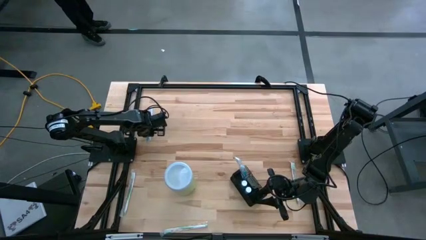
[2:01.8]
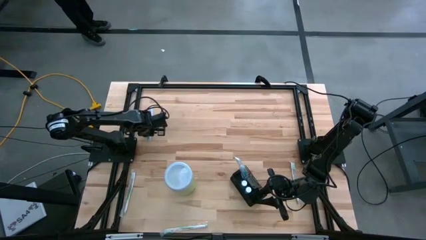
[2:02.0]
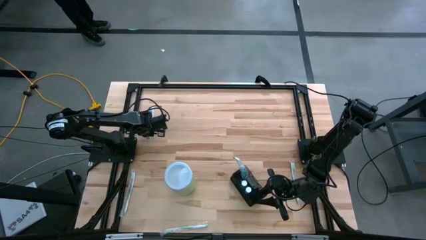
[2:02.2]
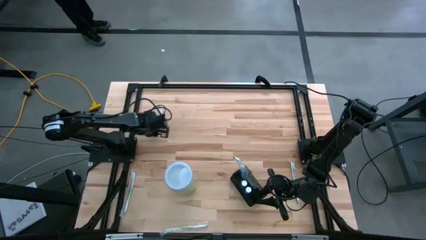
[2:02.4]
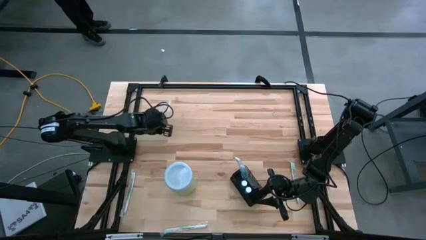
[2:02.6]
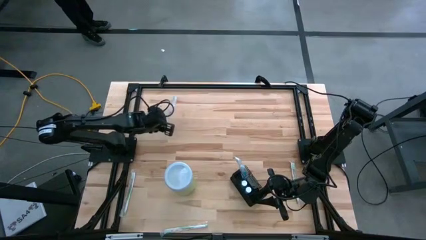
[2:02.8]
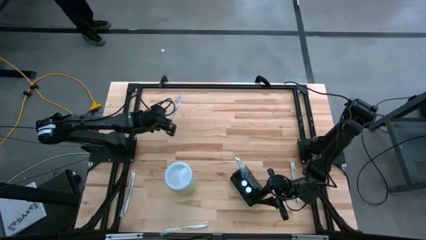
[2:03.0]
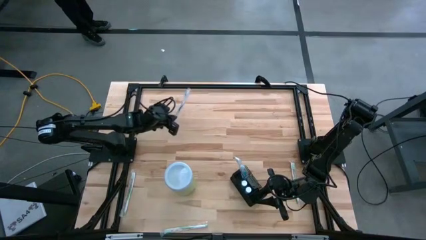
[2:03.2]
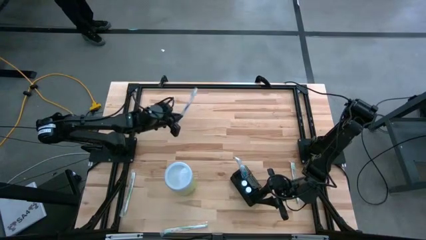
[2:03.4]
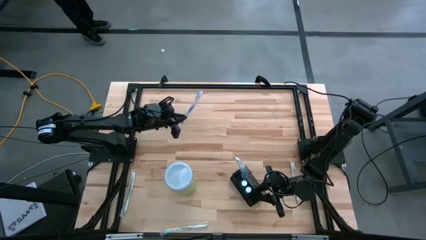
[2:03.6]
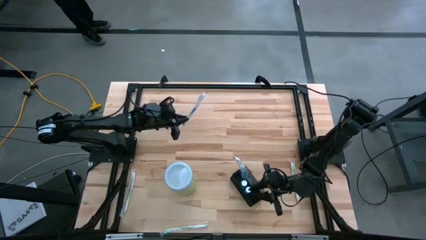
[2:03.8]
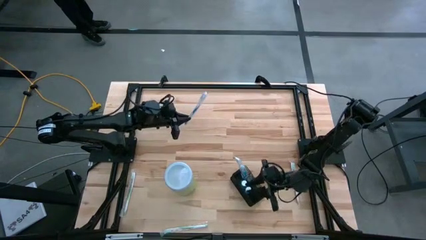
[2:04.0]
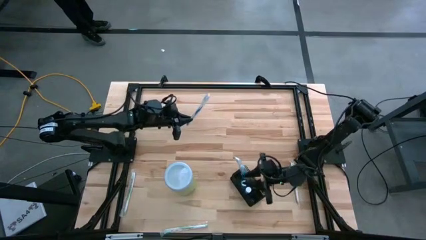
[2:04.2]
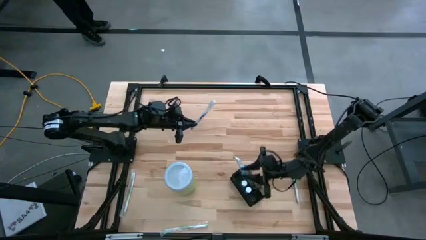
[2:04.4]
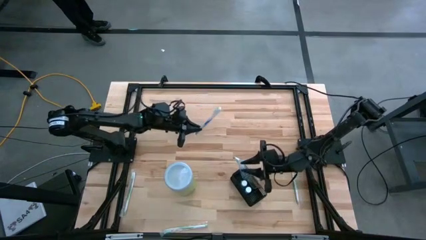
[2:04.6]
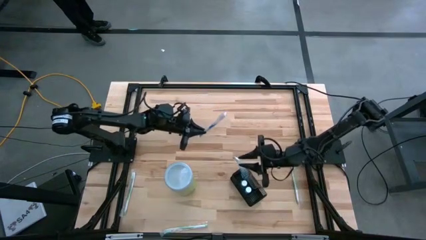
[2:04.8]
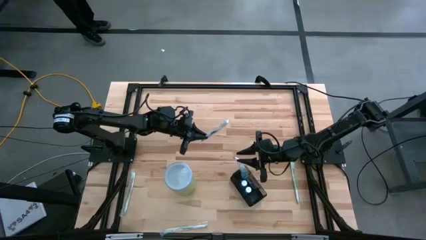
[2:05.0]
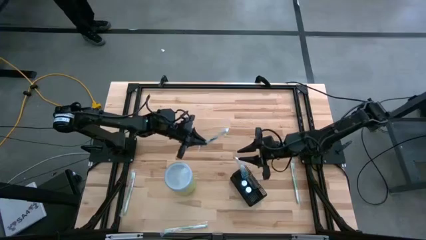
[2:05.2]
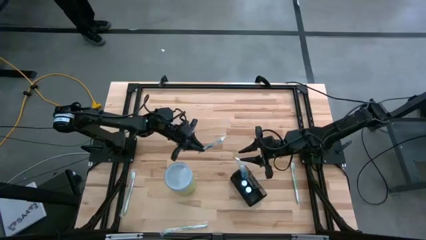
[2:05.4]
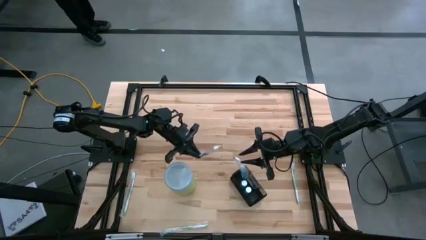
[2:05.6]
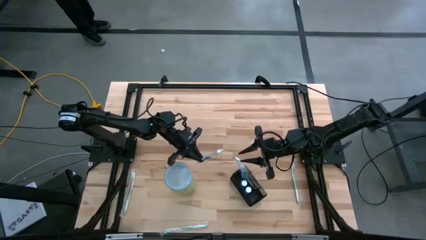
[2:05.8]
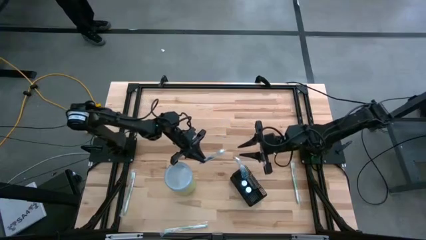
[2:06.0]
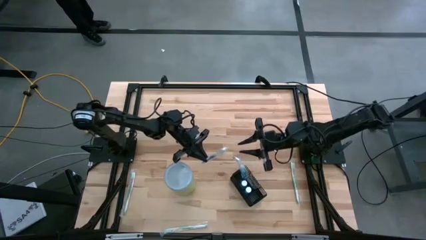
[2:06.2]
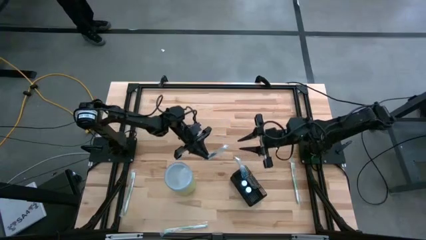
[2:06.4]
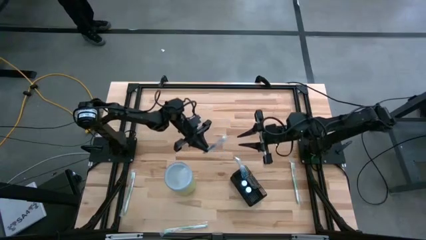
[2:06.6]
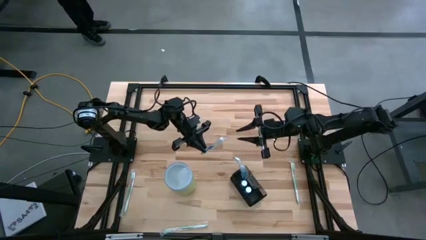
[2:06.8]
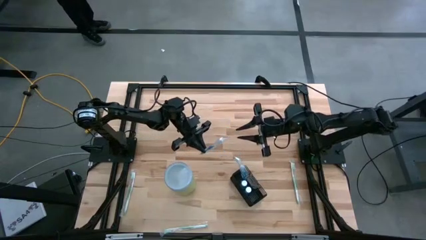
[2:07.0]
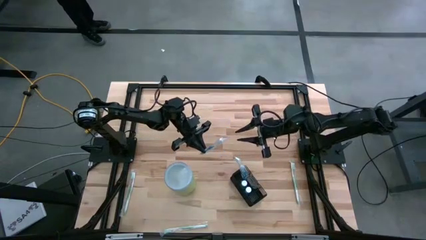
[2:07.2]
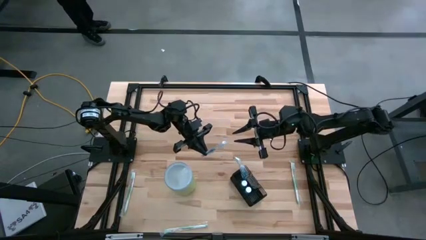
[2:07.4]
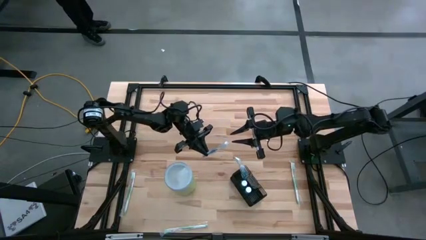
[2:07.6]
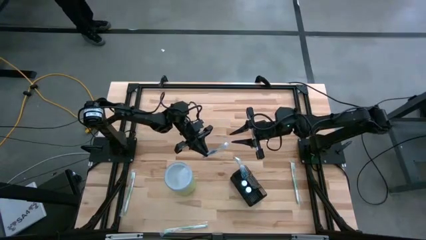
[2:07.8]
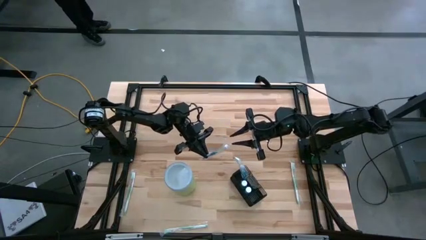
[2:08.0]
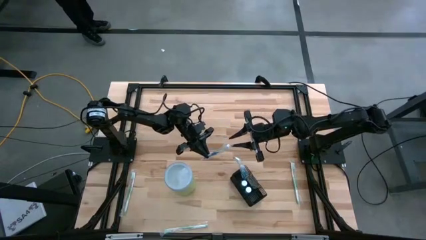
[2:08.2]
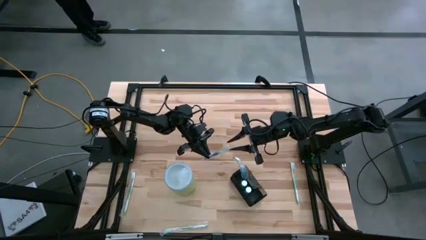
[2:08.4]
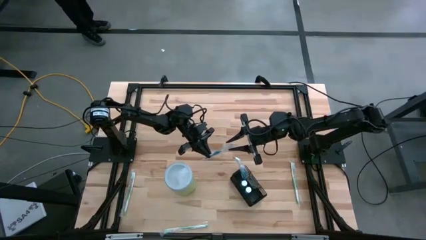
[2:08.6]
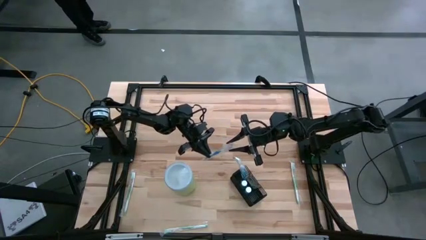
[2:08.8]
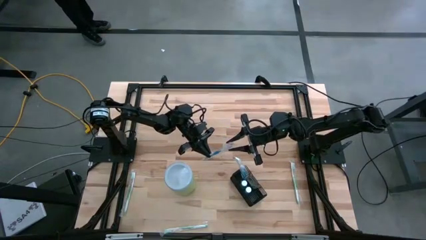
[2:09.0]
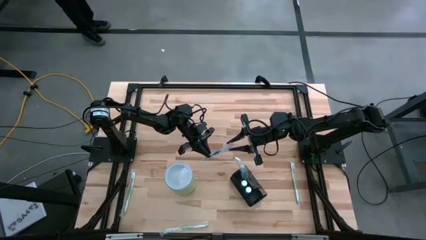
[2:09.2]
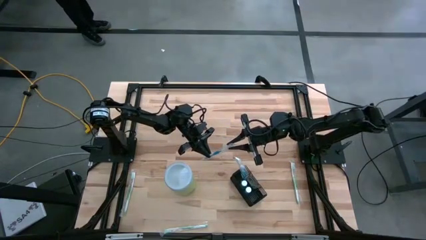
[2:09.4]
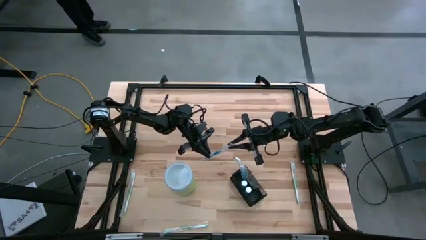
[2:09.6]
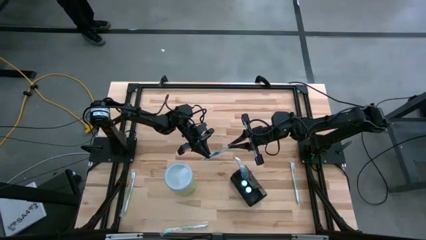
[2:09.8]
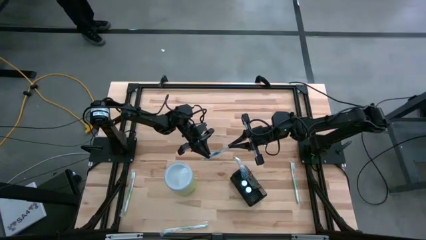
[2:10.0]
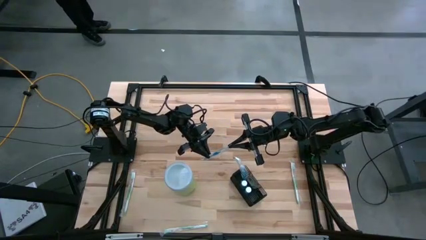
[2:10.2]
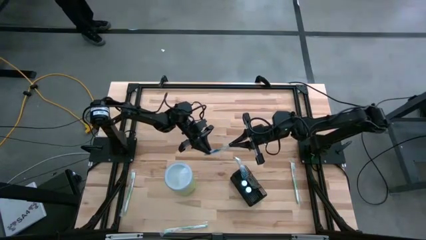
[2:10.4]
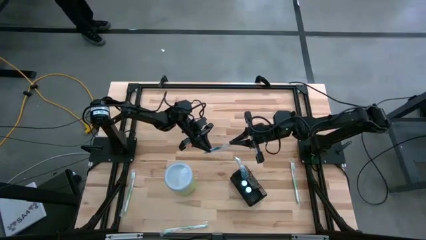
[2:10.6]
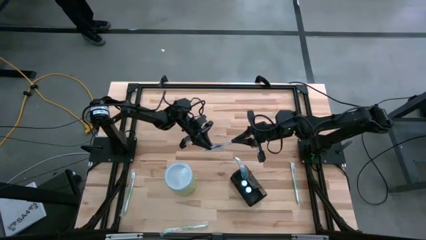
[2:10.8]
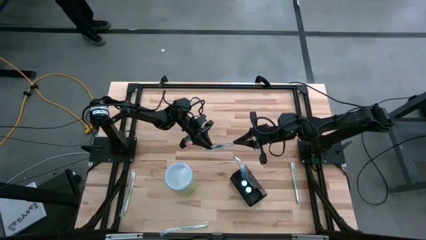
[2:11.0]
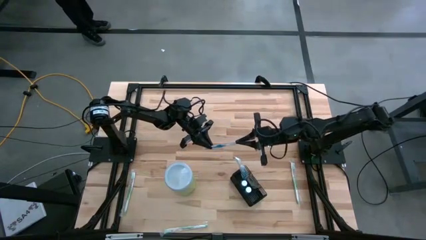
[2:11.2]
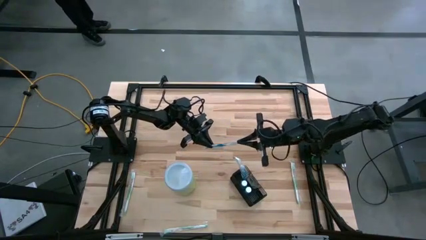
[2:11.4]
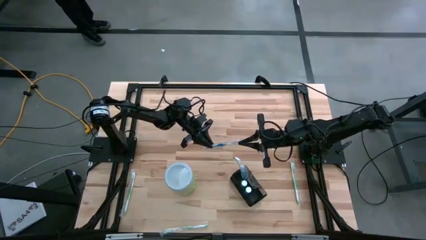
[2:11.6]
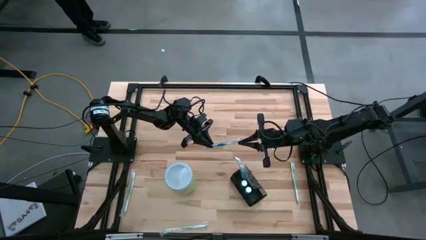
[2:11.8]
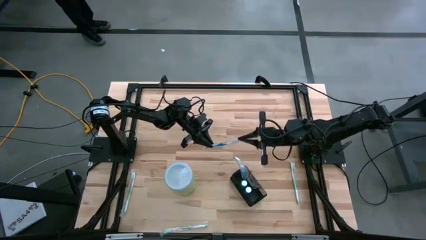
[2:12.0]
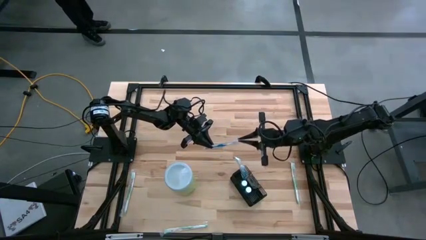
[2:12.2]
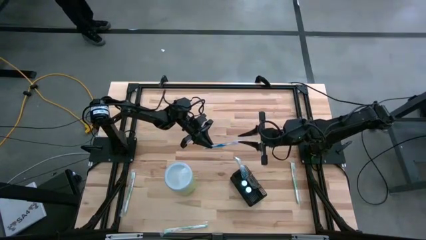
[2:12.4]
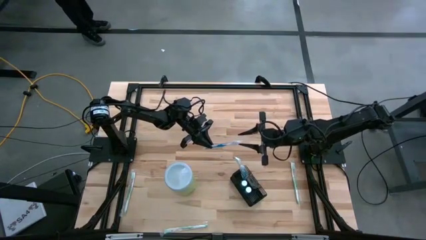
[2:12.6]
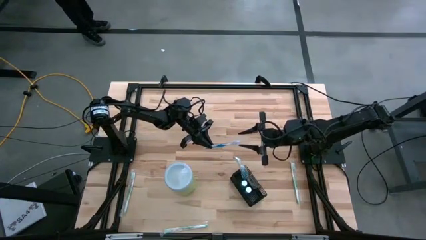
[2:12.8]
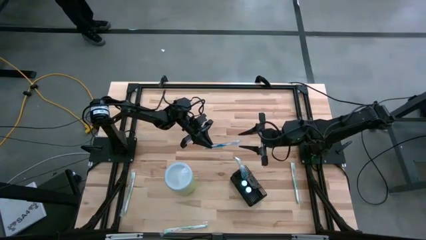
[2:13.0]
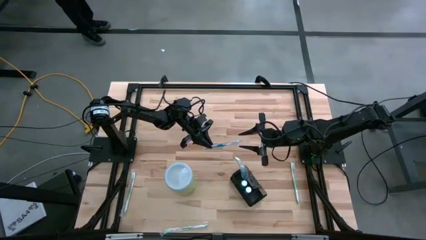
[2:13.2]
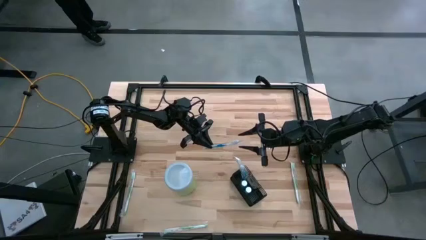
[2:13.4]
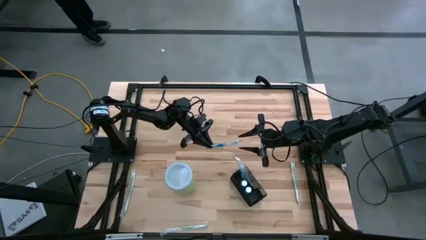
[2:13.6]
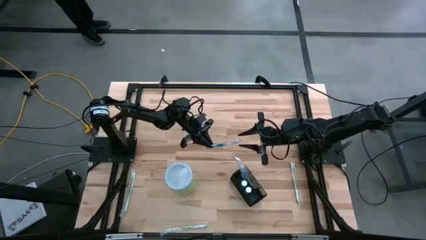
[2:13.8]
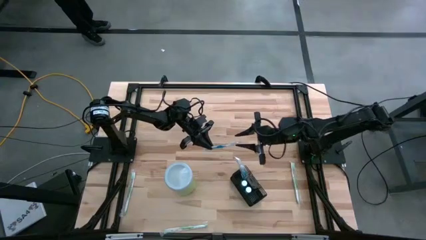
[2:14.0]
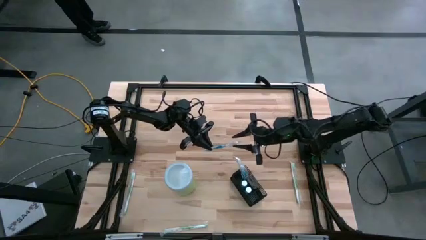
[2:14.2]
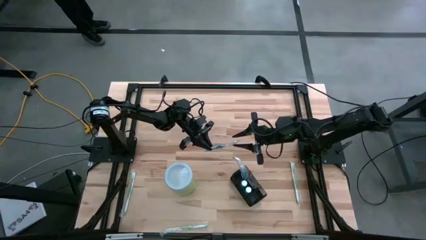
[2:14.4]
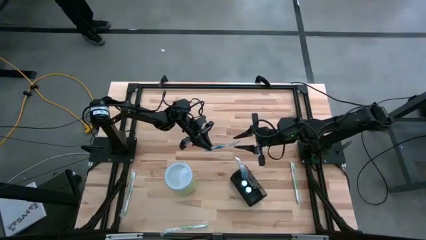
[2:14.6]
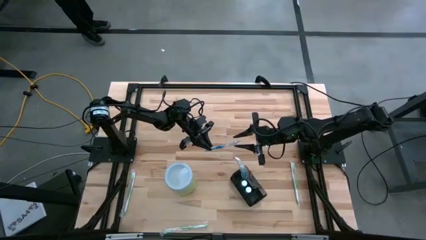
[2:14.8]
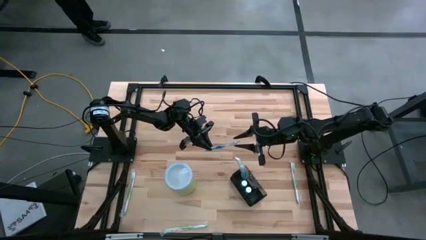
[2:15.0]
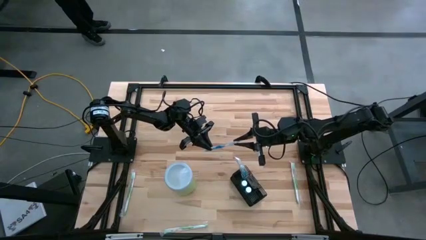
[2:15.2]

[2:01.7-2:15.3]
Task: Pick & Place toothbrushing station
Put the blue toothbrush into the black mesh organizer

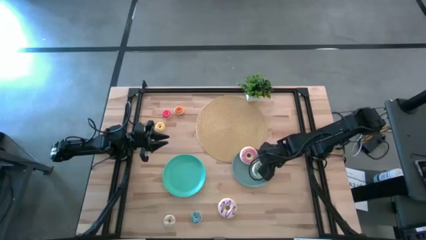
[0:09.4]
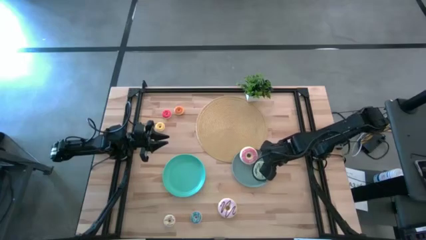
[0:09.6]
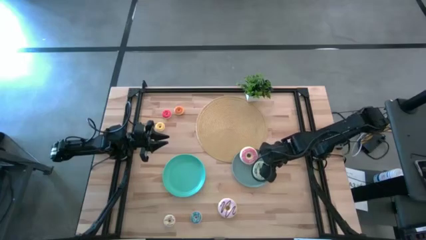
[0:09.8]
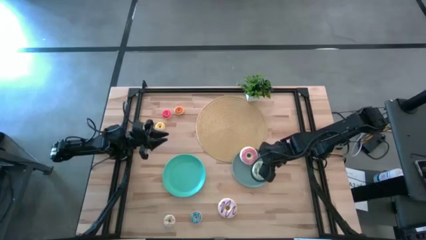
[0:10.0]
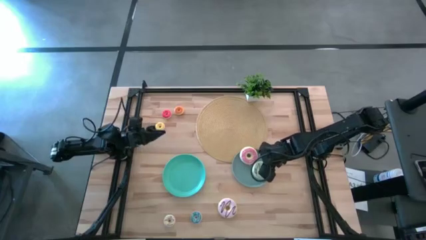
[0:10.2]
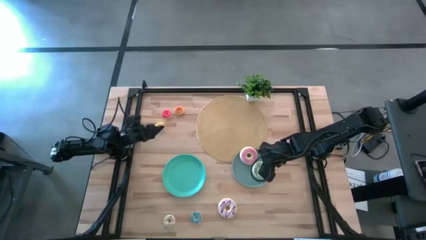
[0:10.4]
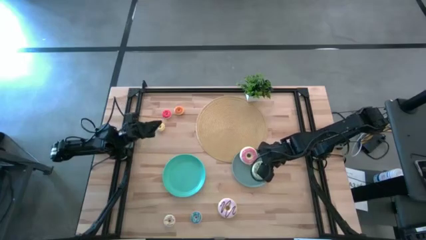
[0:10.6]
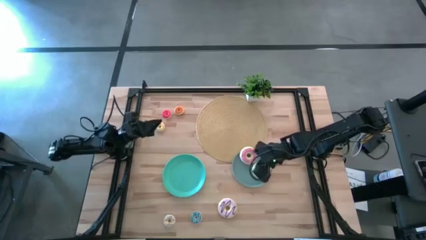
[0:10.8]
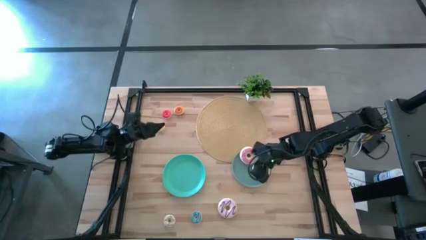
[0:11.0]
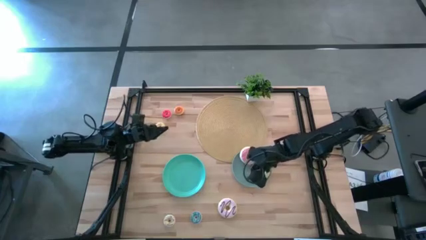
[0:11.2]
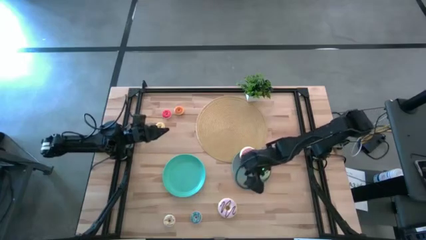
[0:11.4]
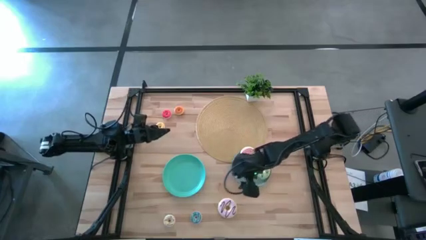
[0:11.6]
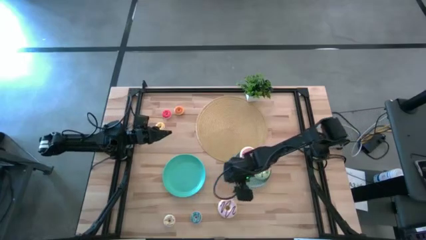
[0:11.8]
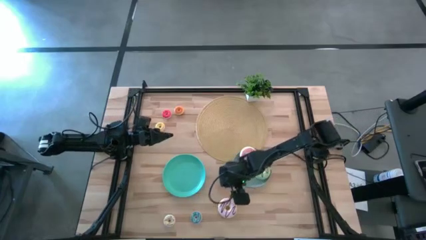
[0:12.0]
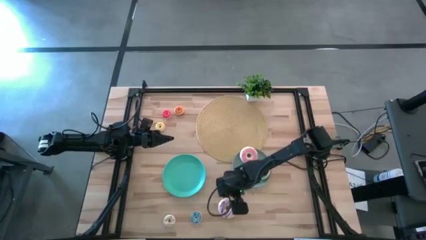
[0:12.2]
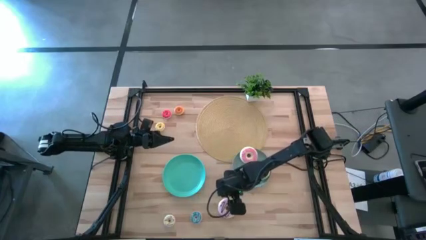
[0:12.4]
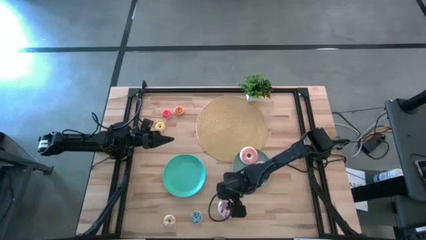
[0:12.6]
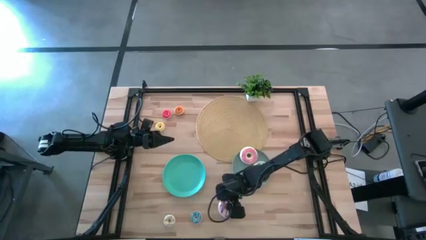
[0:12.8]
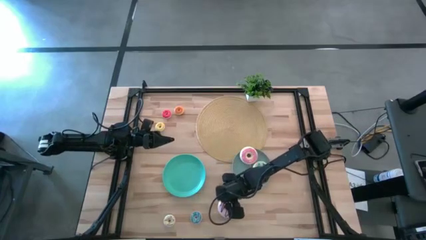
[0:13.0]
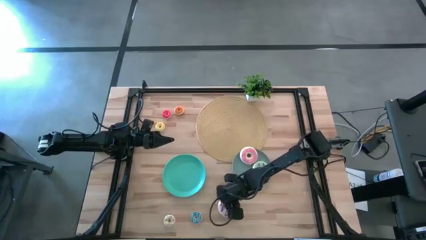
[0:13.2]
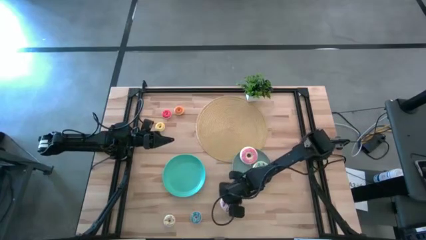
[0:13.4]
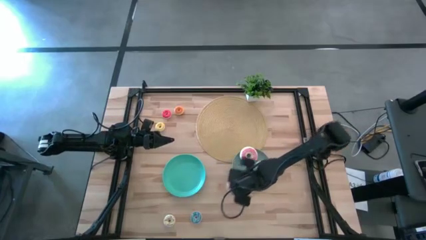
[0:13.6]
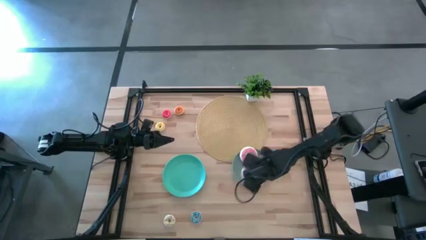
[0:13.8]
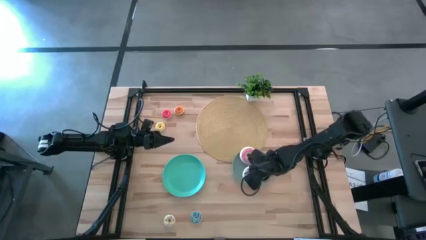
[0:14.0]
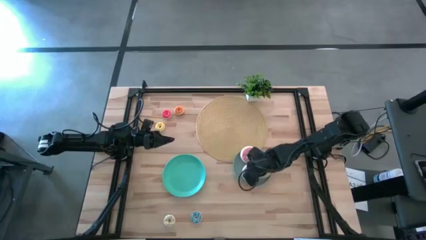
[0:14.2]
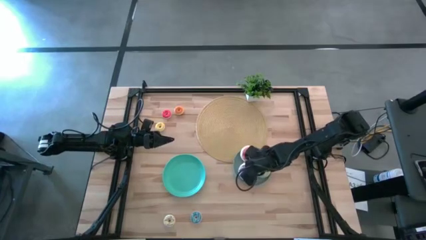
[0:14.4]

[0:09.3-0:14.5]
Task: Pick & Place donuts
Put the large purple donut on the light blue plate
